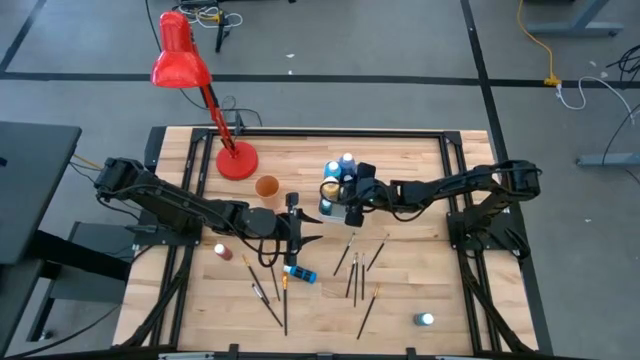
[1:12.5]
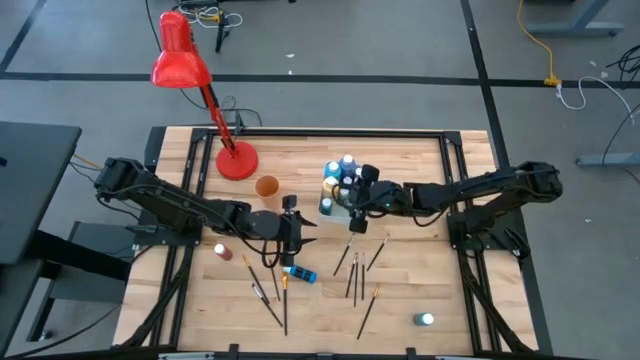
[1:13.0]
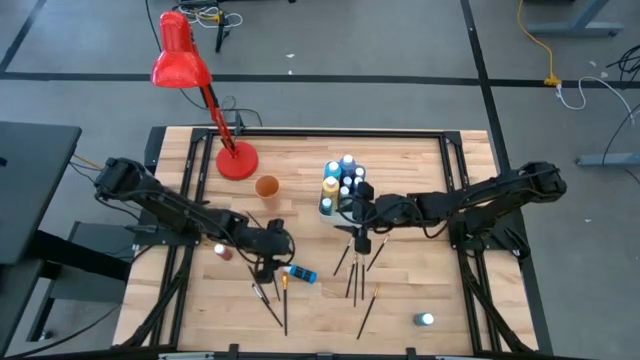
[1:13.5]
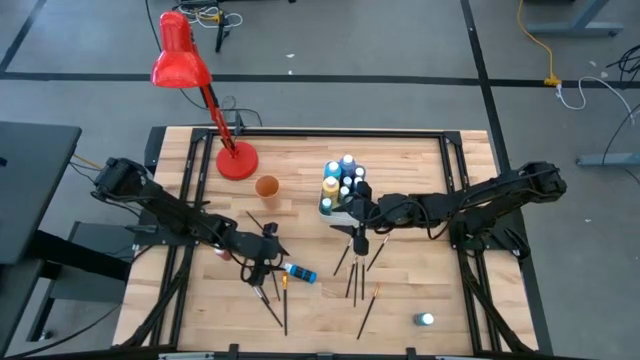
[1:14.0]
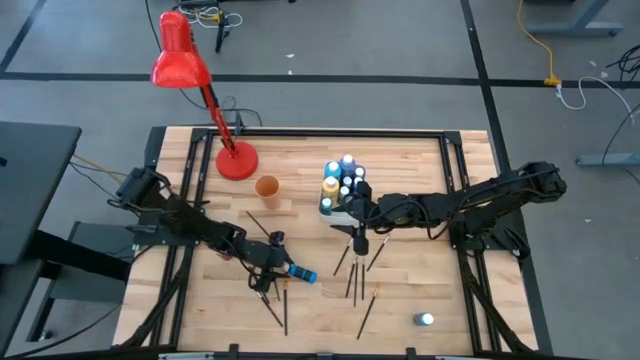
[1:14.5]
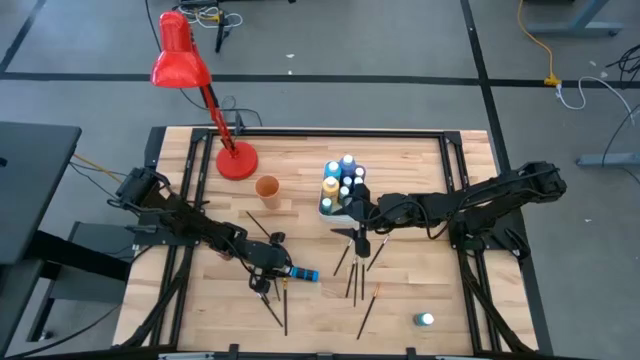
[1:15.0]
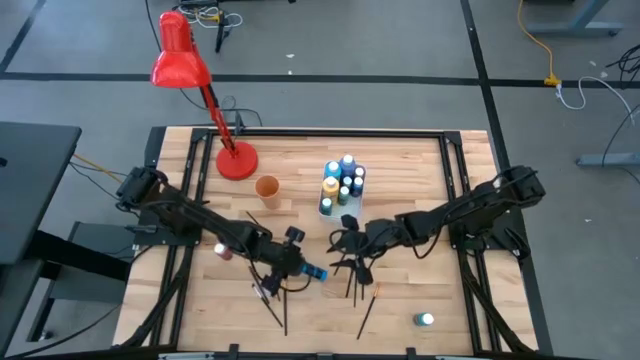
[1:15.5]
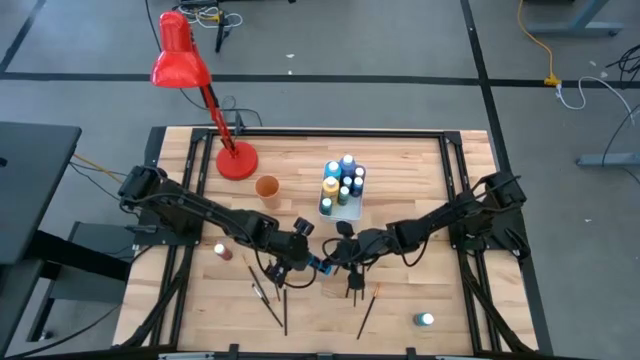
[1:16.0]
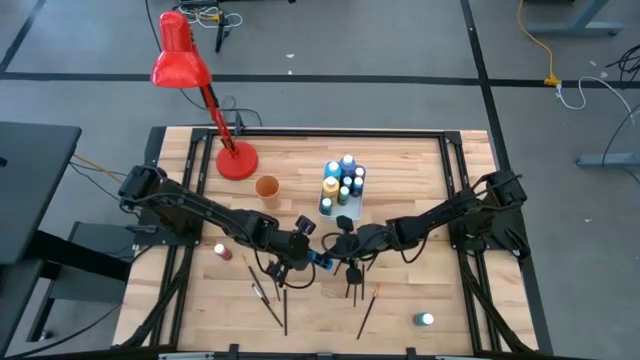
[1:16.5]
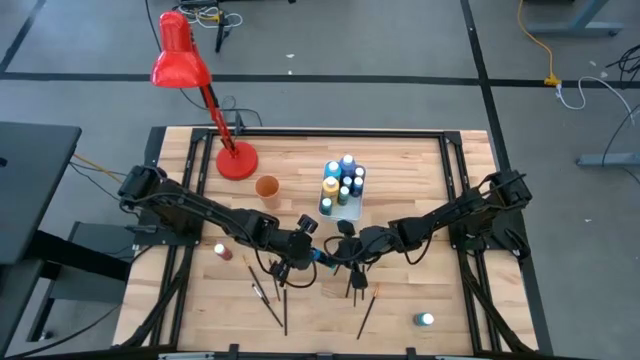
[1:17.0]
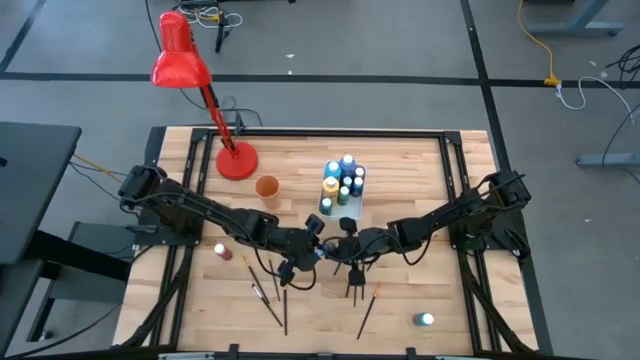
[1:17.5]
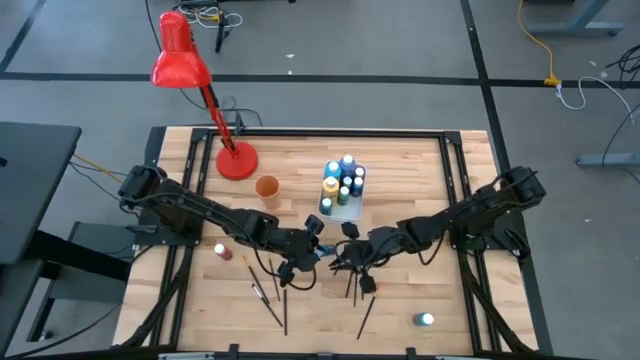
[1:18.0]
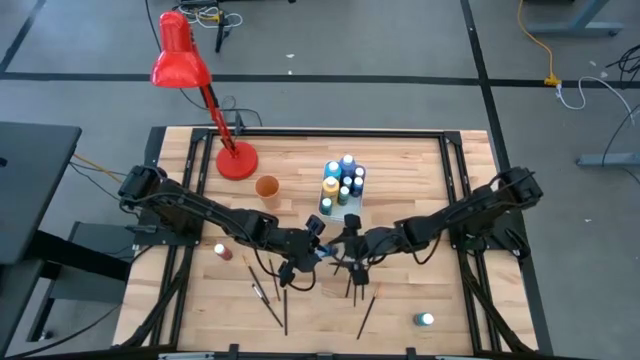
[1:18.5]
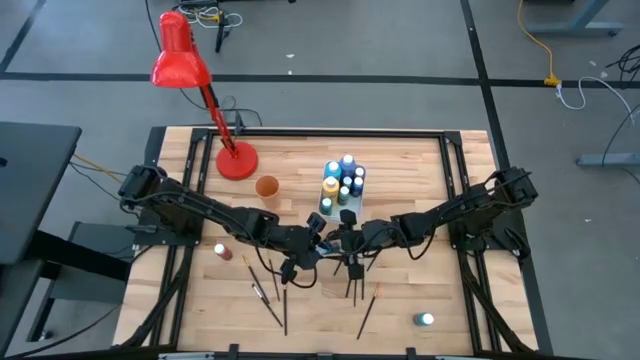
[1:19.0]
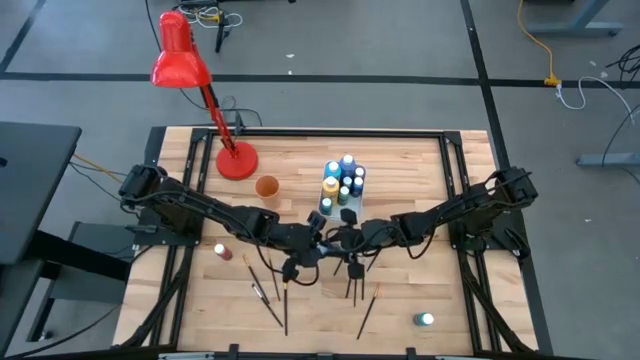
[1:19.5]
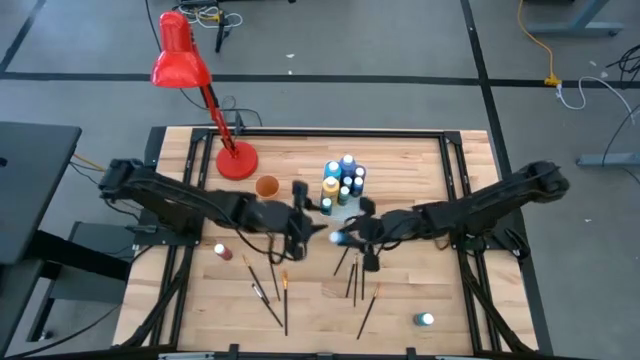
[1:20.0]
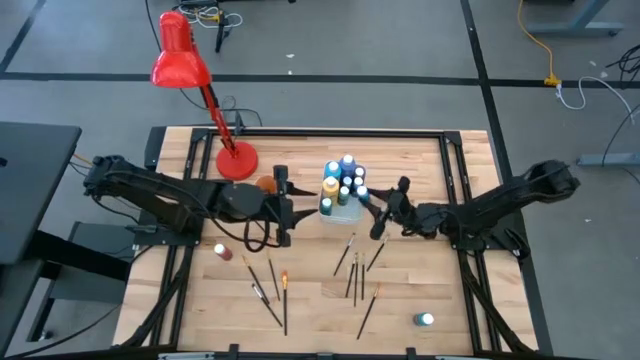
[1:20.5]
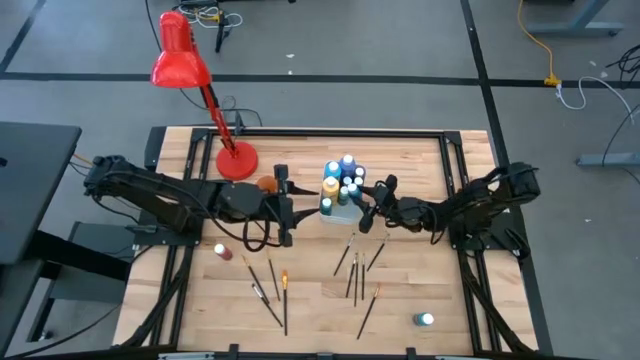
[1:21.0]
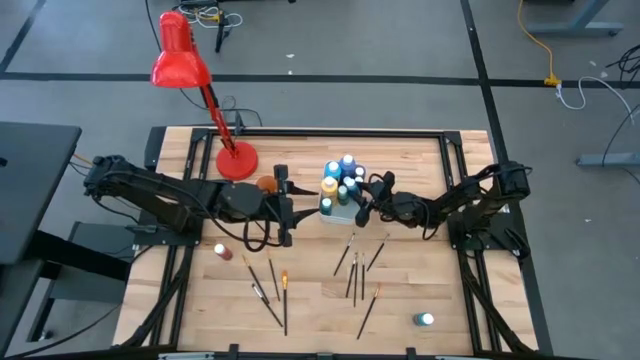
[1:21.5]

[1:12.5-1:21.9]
Task: Pick & Place Paint Supplies
Put the small blue paint bottle into the white bin

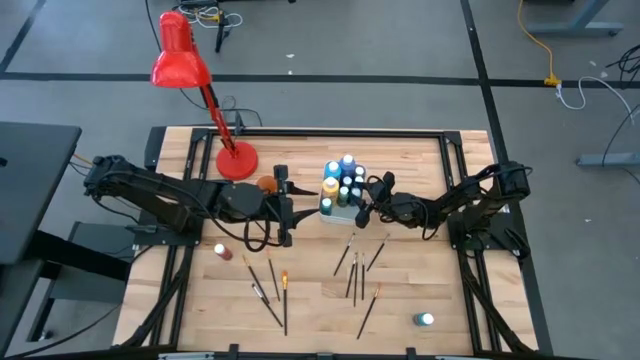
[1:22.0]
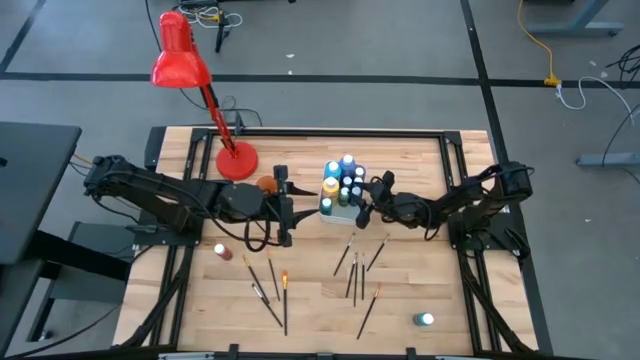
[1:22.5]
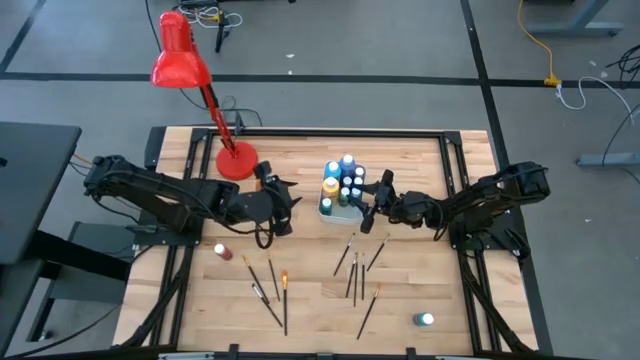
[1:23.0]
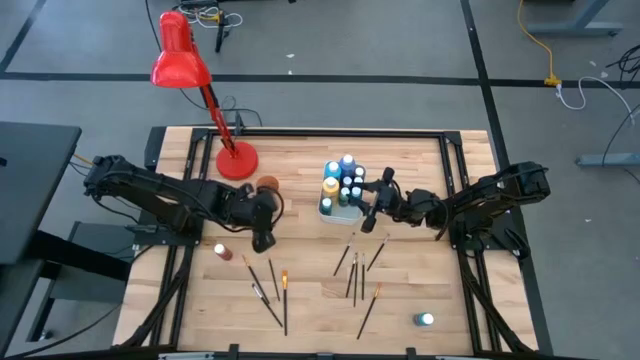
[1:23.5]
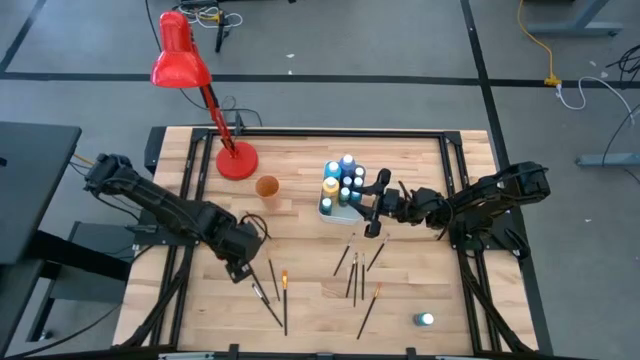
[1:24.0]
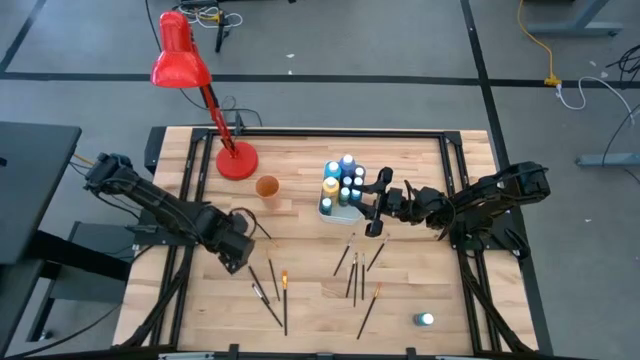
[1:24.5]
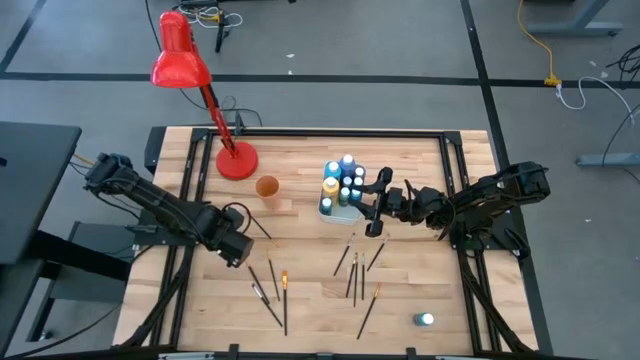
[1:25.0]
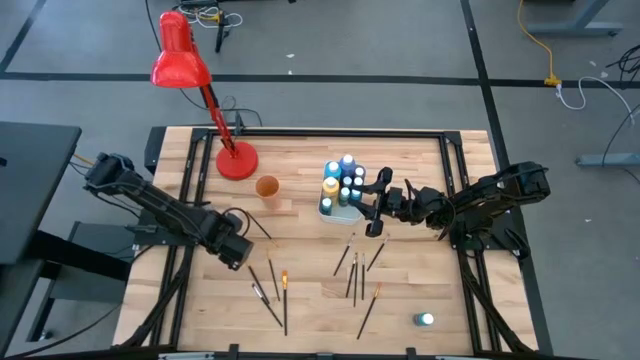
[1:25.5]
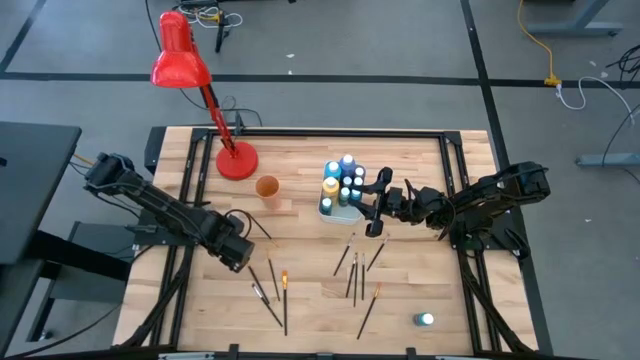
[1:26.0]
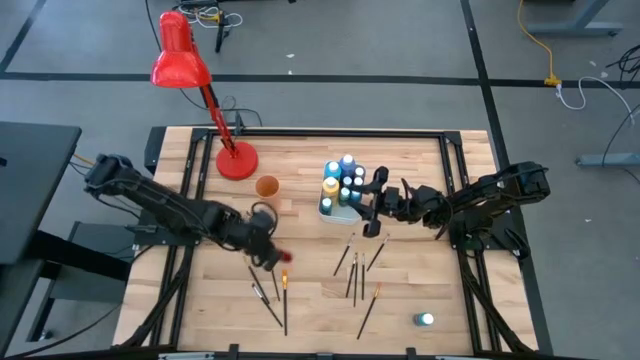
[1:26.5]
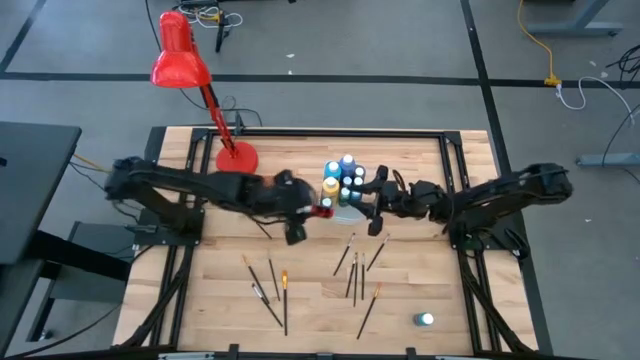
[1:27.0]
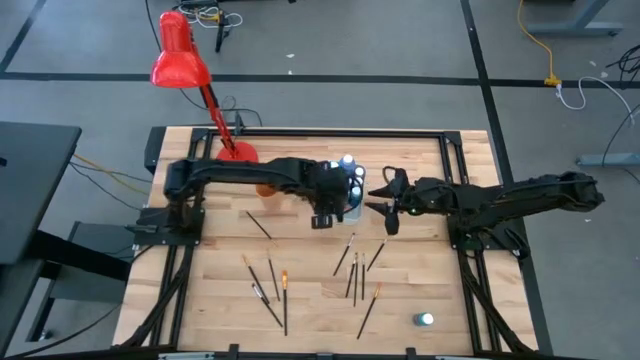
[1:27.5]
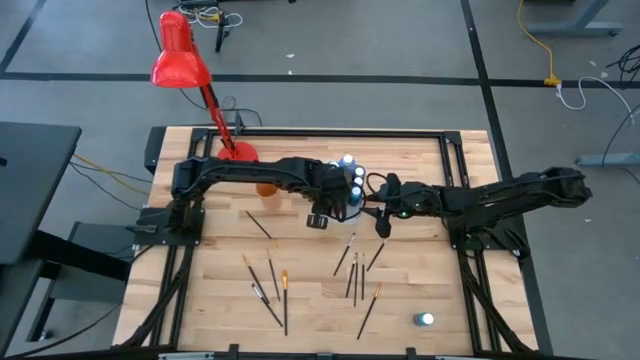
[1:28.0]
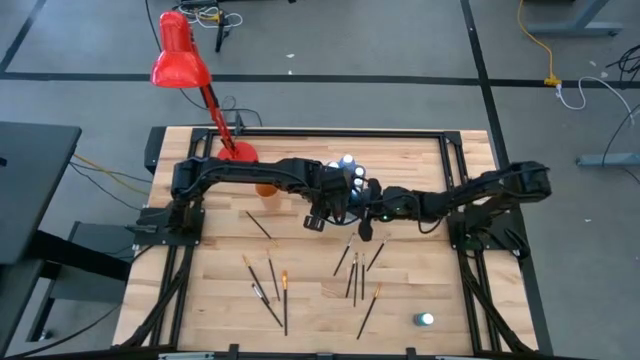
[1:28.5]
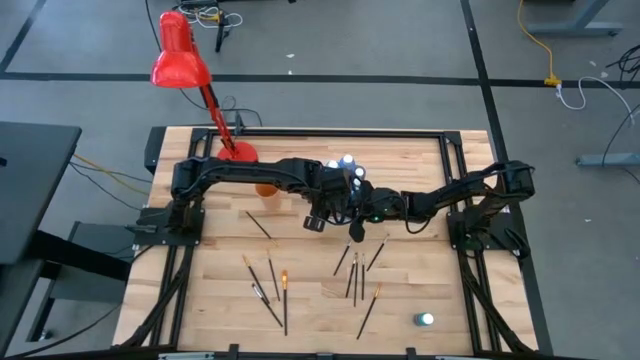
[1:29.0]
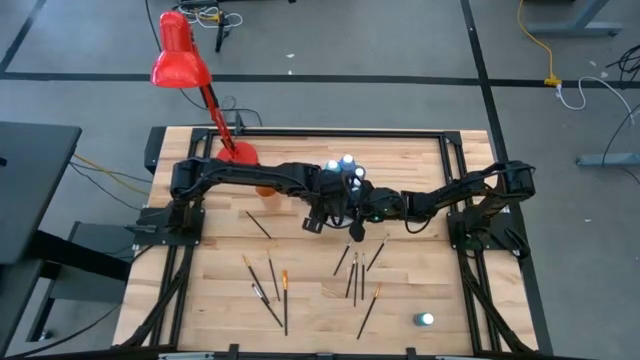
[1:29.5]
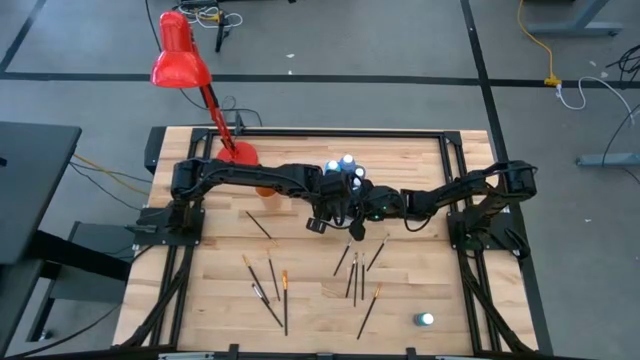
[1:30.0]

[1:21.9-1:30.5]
Put the small red paint bottle into the white bin

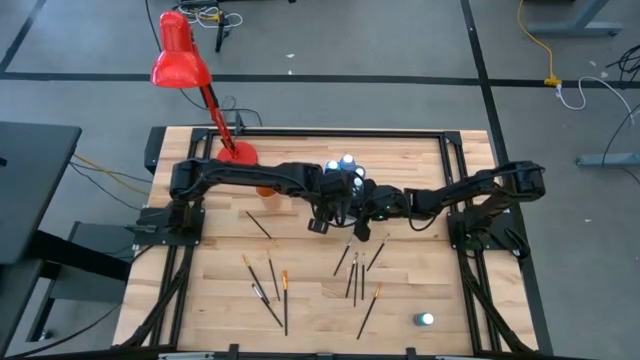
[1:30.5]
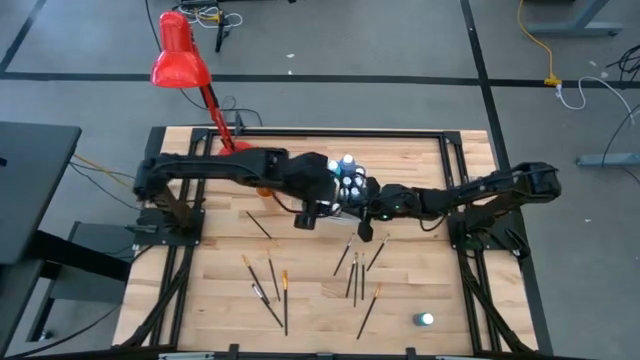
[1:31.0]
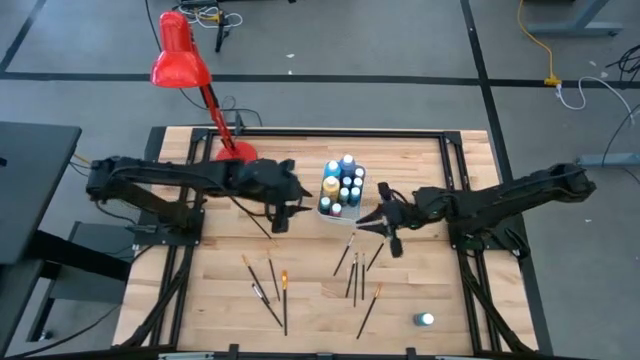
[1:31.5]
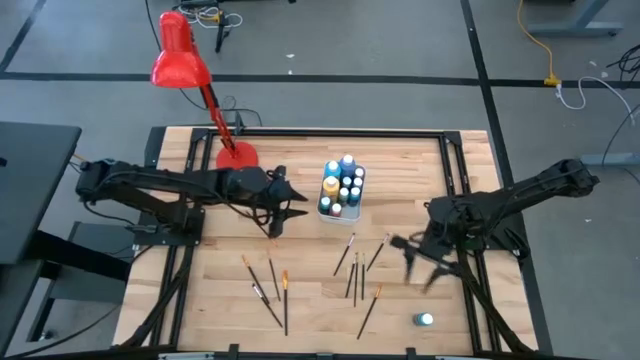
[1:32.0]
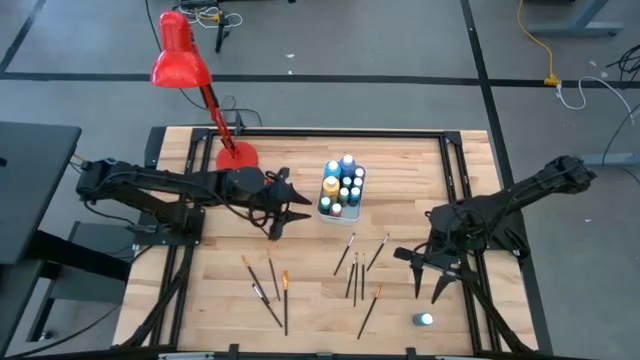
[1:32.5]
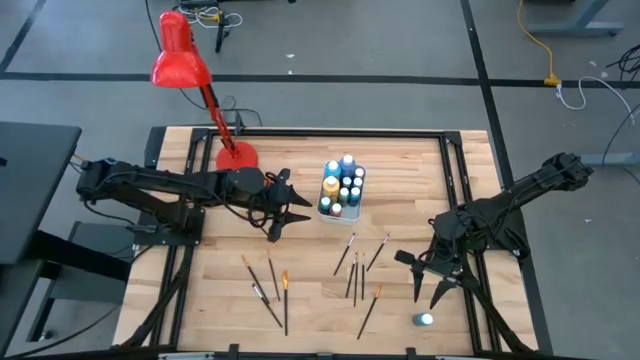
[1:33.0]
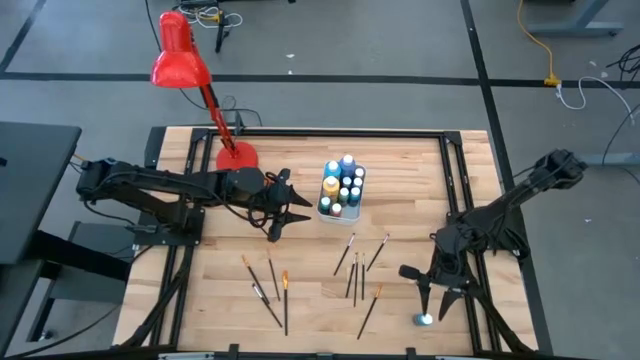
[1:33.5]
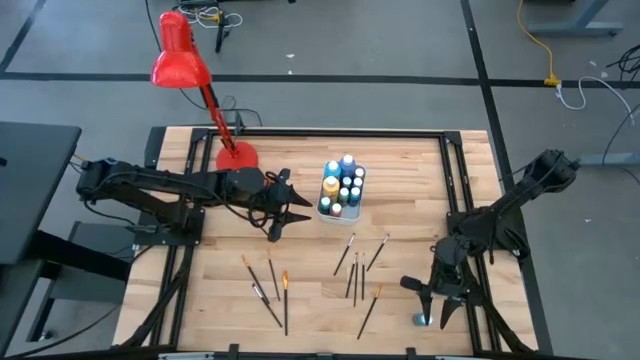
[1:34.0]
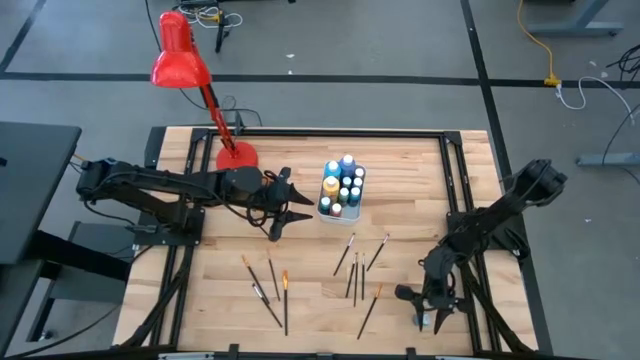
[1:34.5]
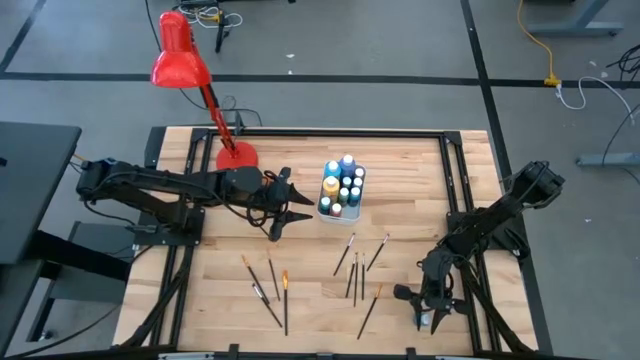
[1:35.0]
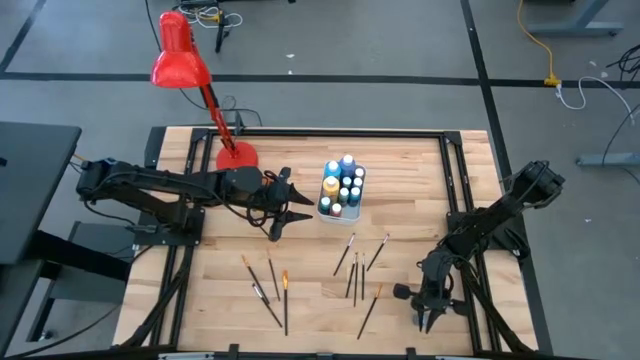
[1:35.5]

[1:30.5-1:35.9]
Put the small dark green paint bottle into the white bin
